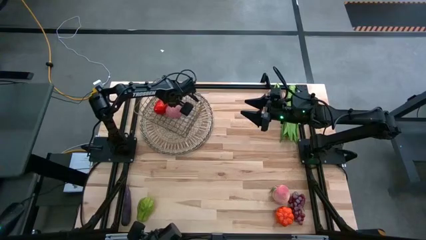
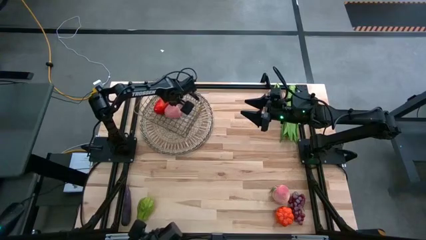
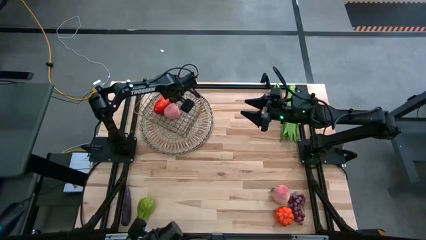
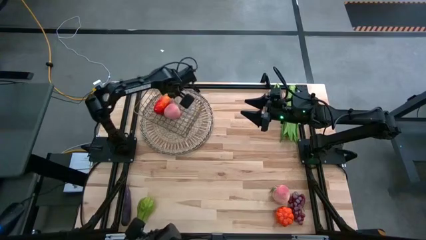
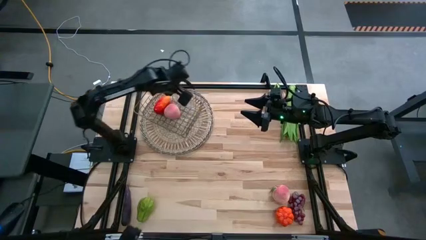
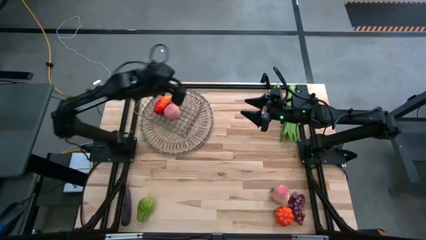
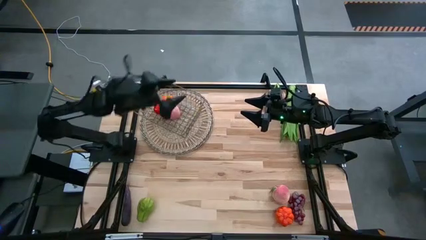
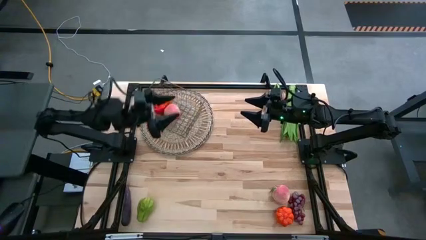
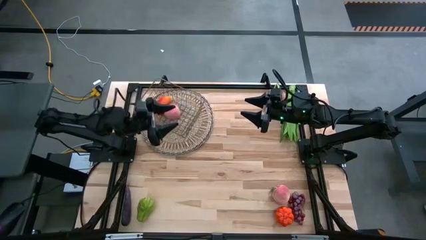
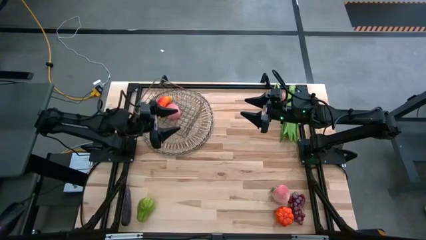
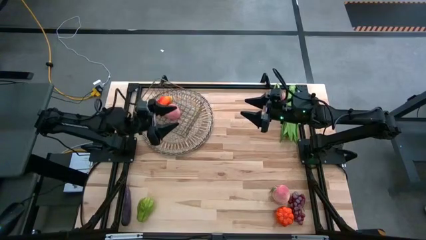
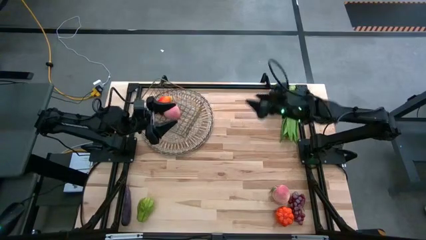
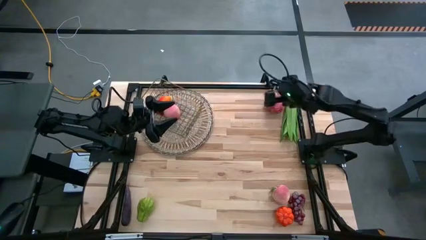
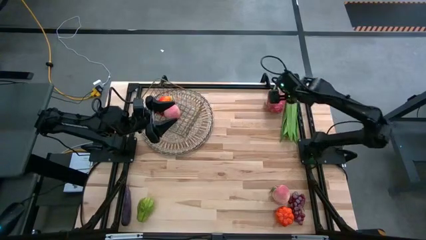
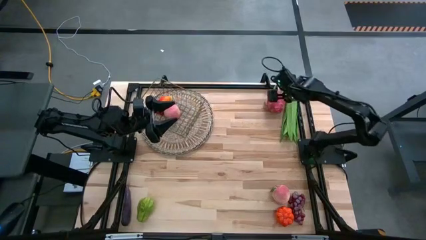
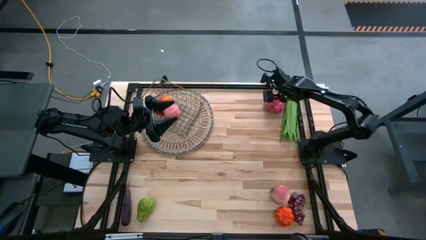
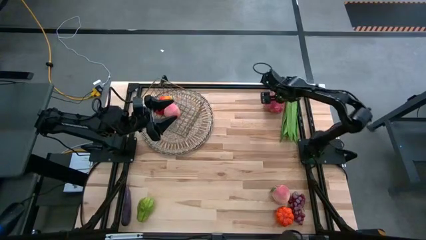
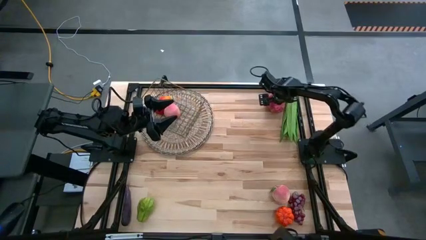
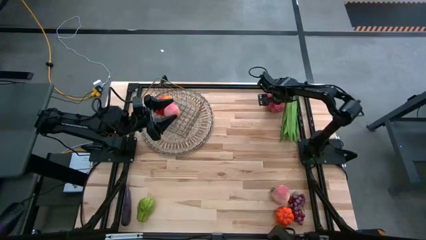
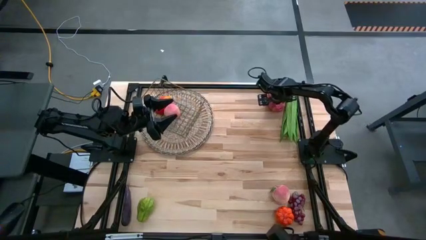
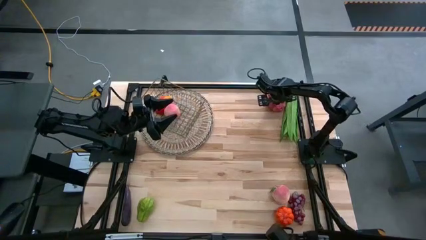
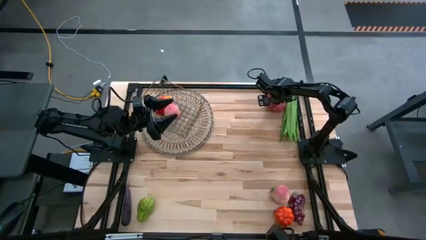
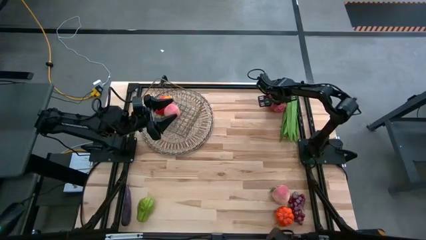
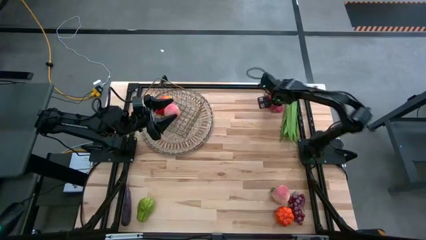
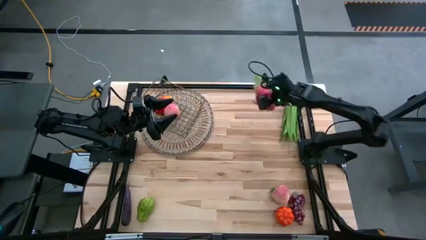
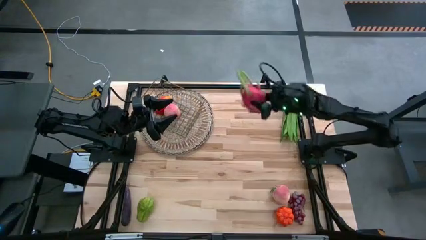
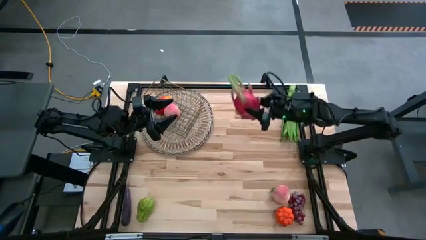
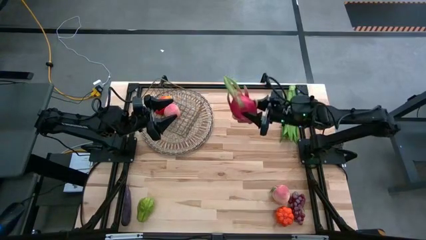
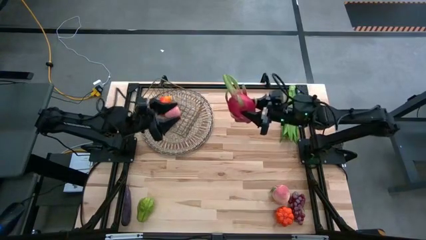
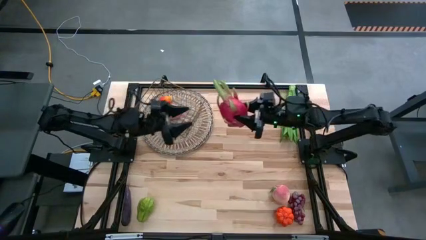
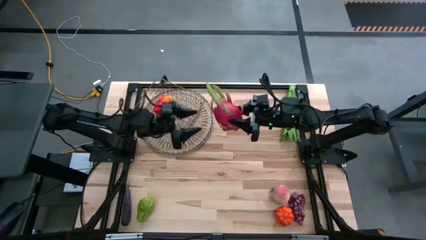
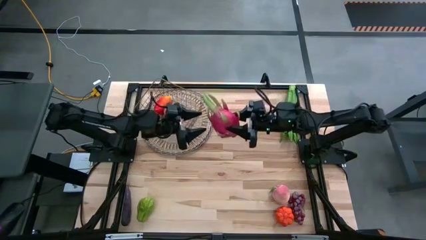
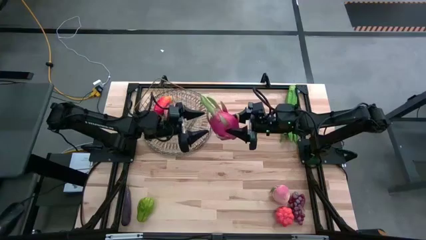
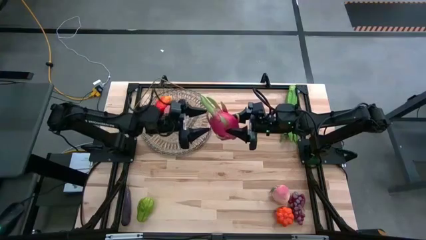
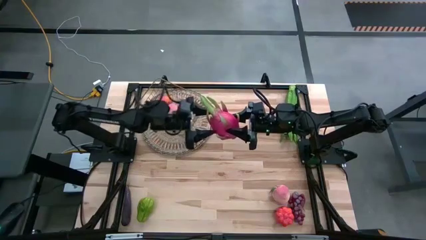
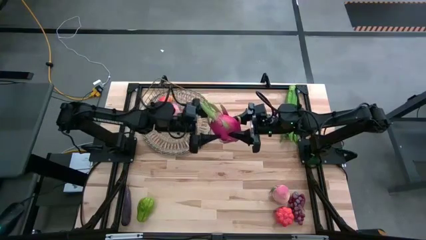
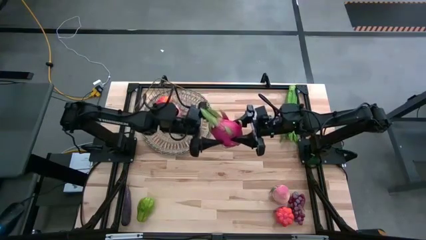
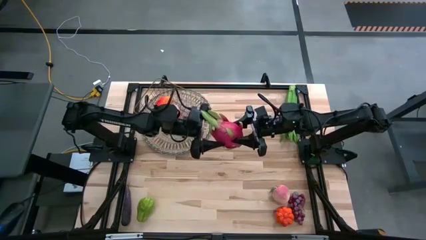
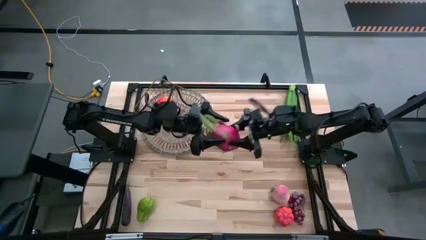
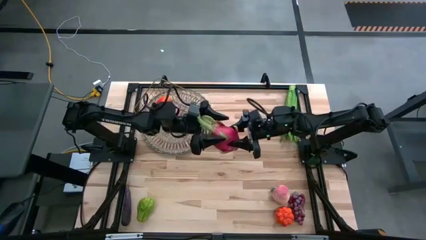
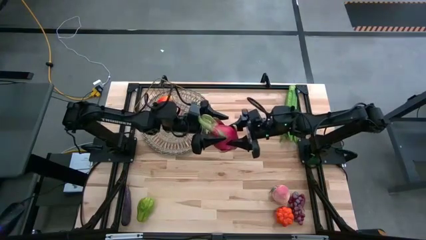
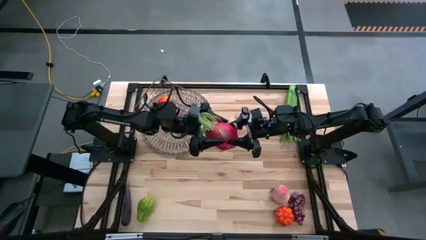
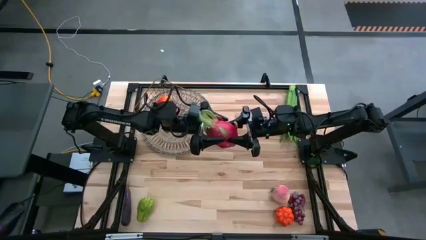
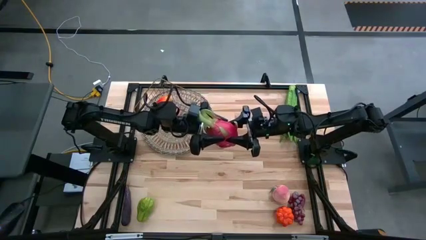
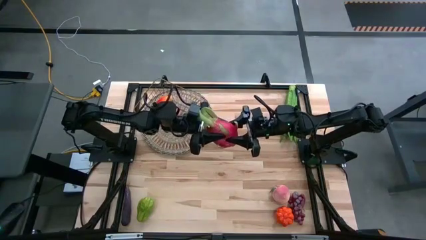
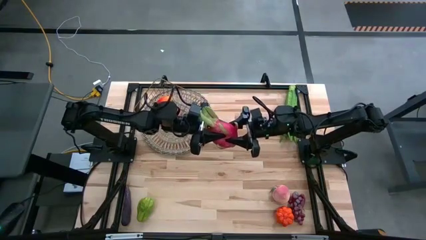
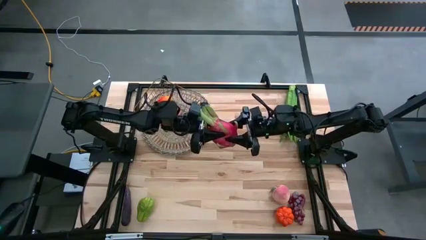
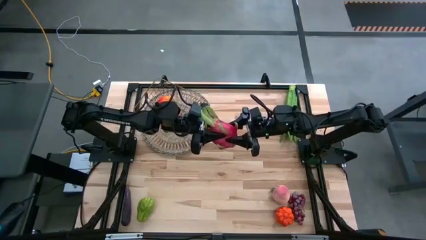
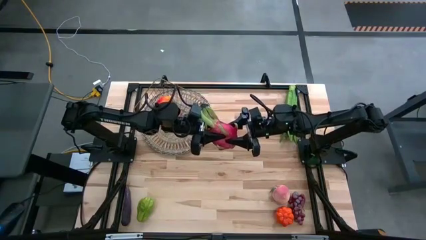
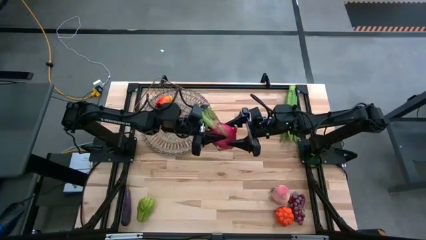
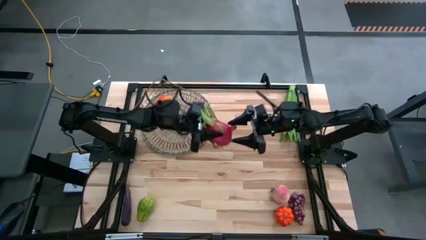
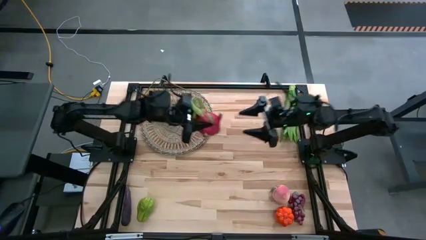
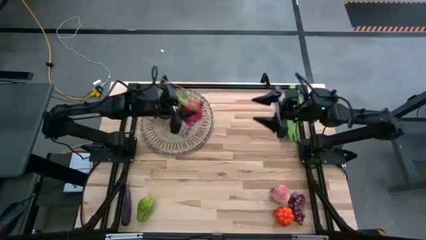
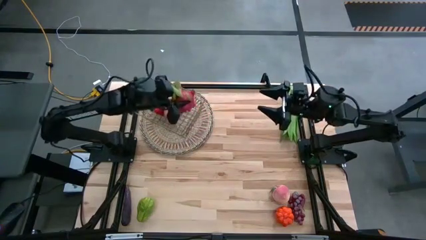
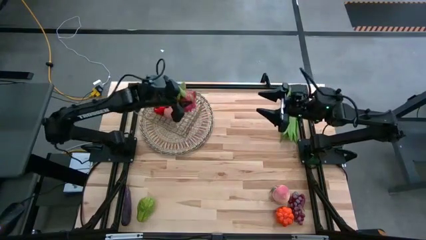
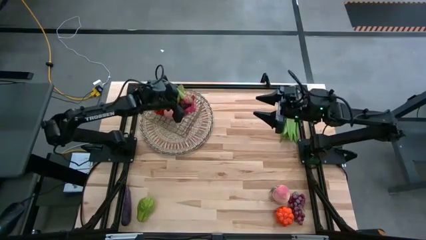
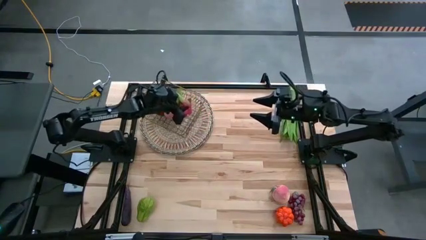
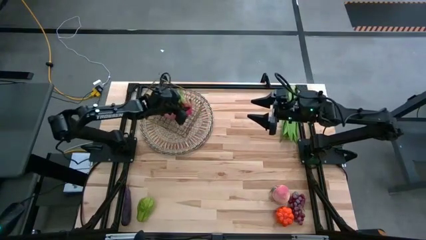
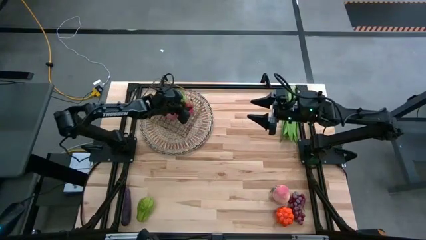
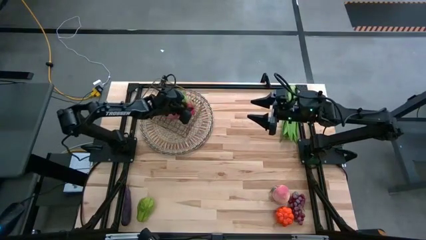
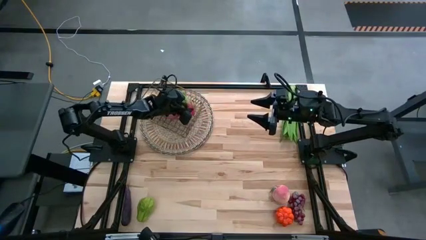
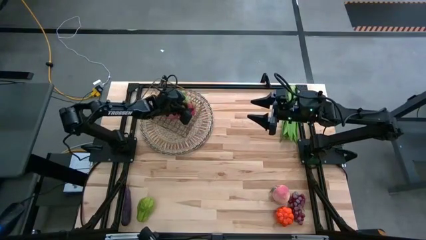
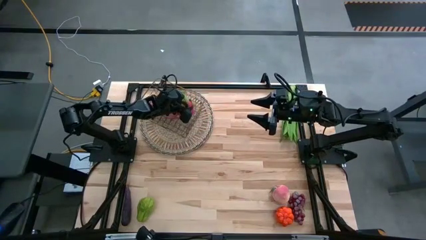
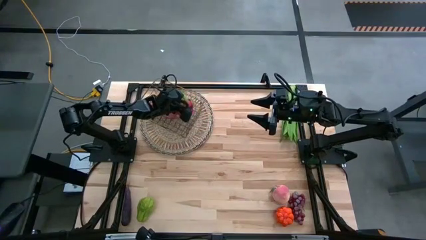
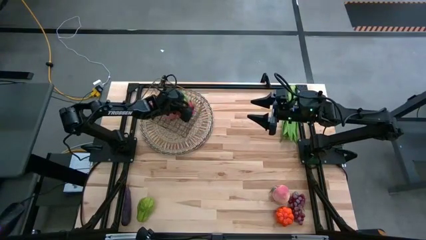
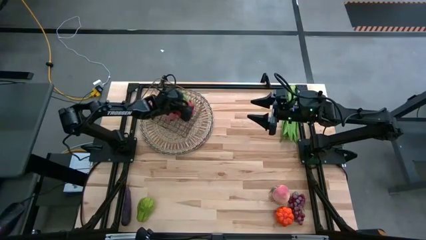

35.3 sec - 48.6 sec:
Task: Build produce basket
Put the dragon fruit into the wire basket

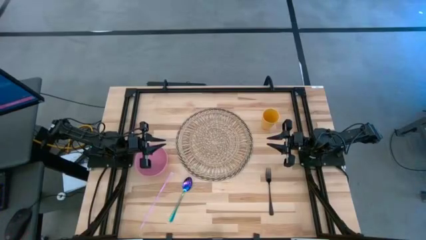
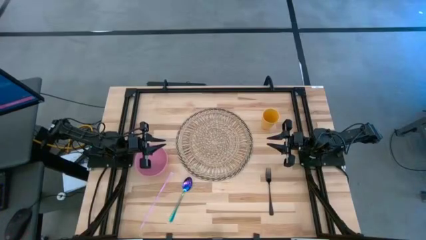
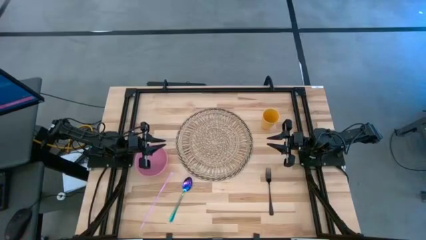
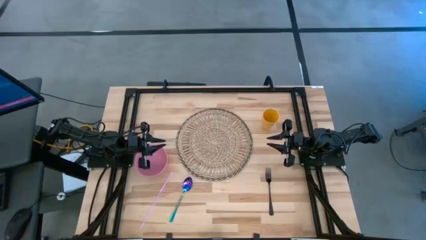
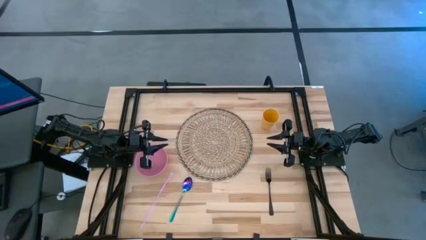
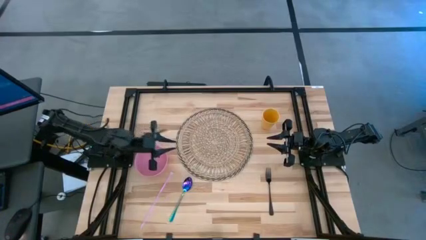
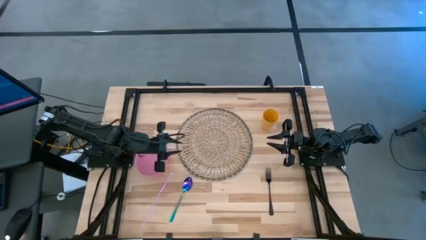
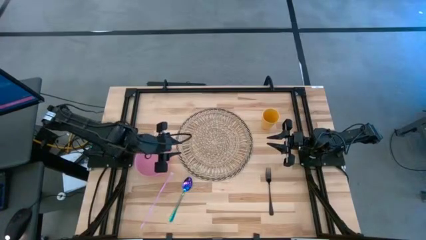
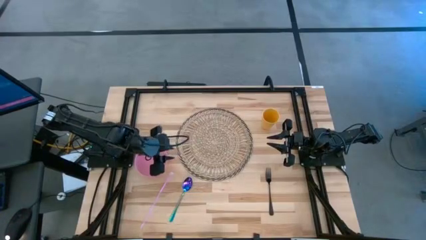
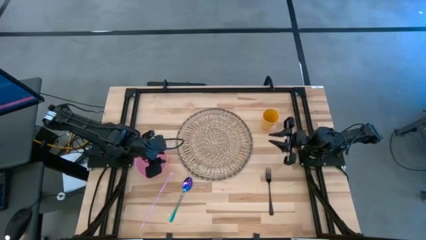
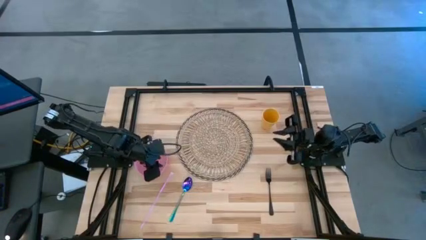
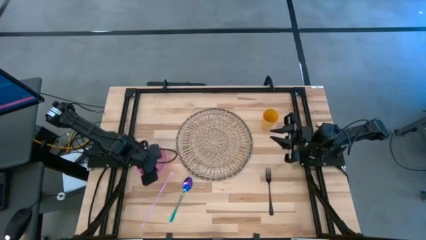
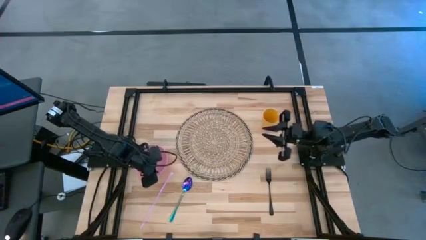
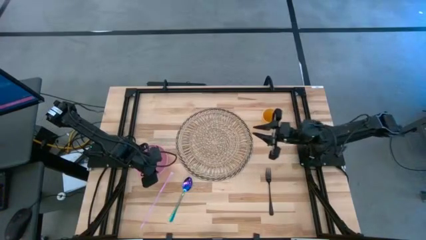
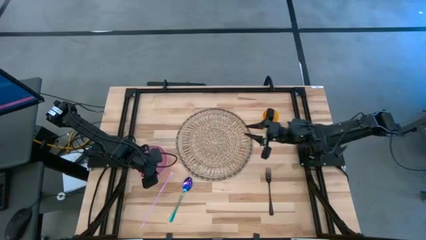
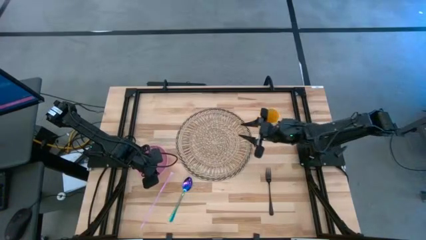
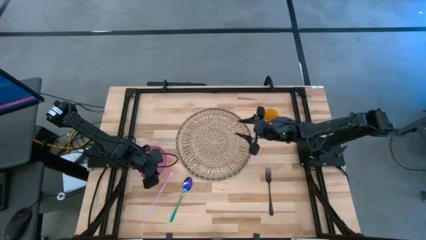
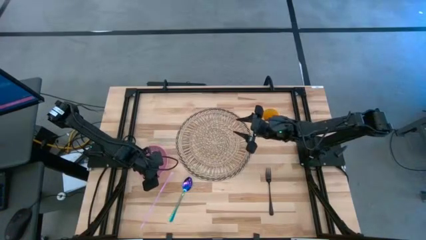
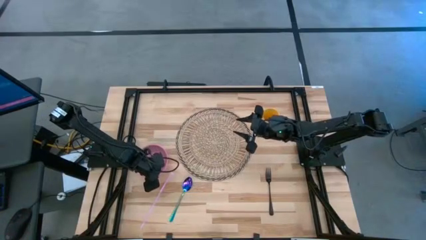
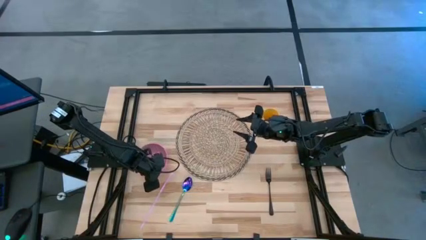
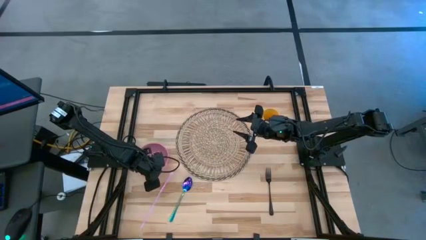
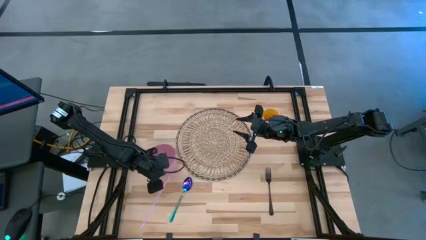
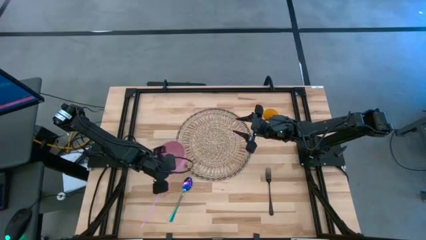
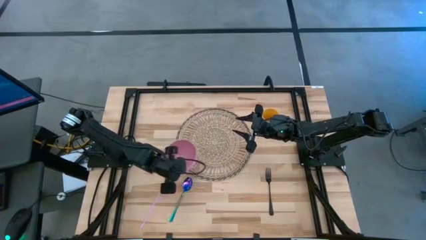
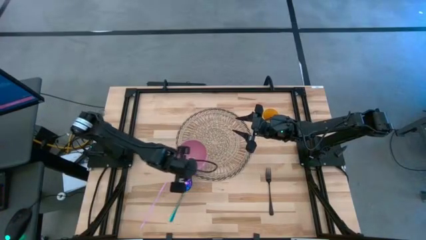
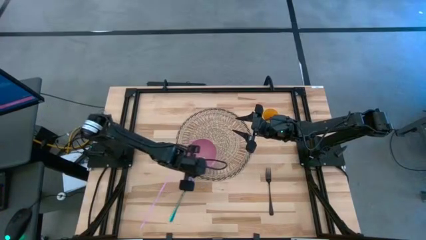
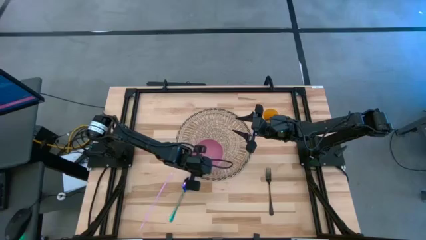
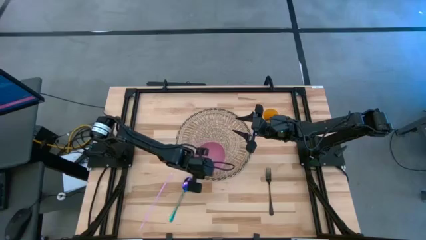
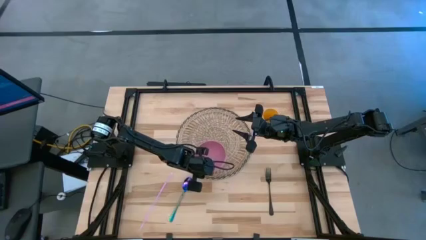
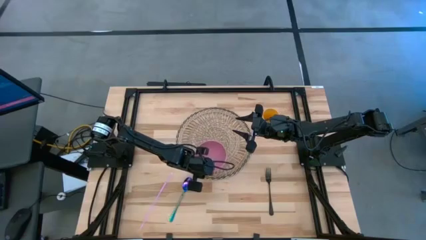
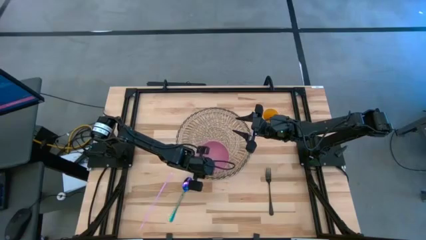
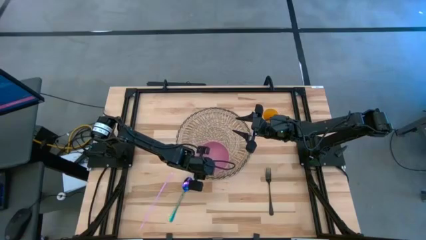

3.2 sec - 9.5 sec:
Task: Pick & Place Utensil
Put the pink bowl on the bottom of the brown mat
